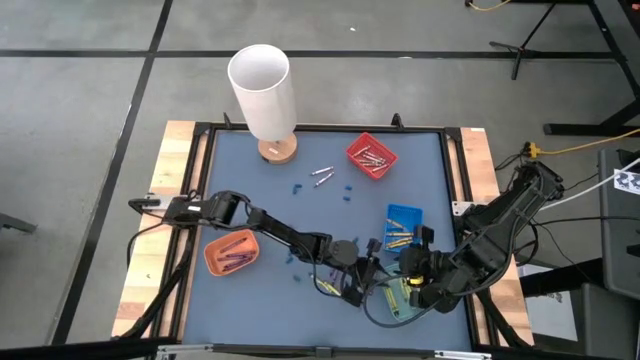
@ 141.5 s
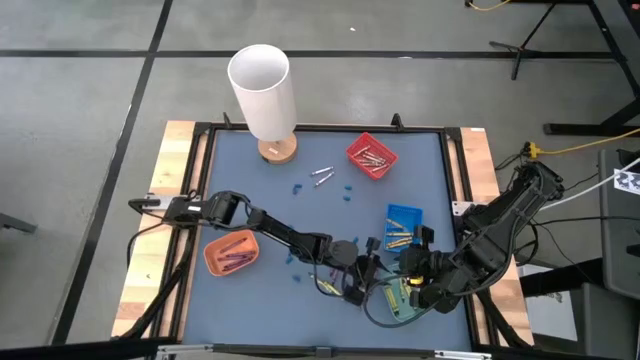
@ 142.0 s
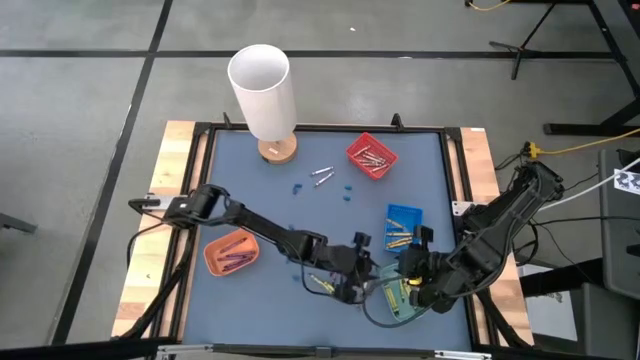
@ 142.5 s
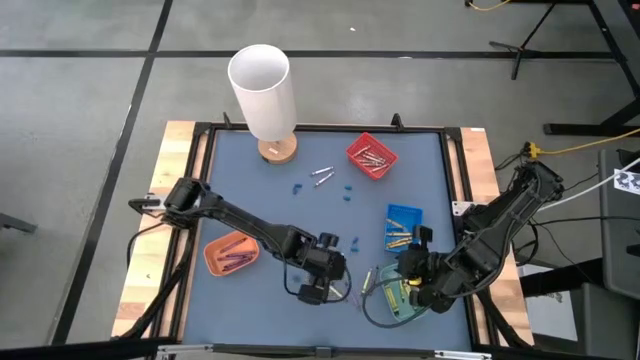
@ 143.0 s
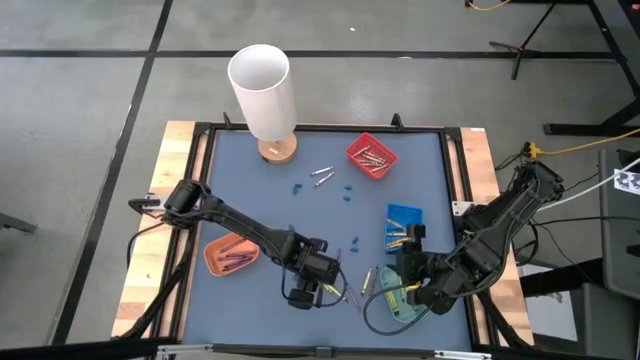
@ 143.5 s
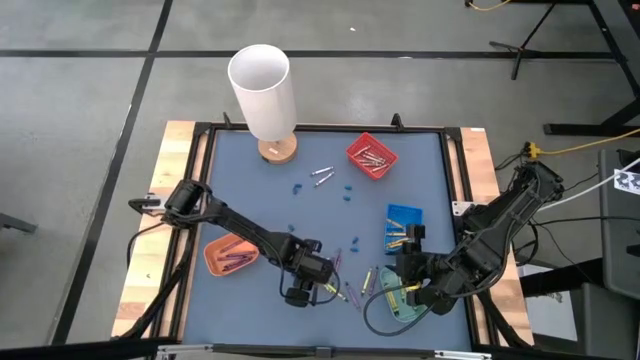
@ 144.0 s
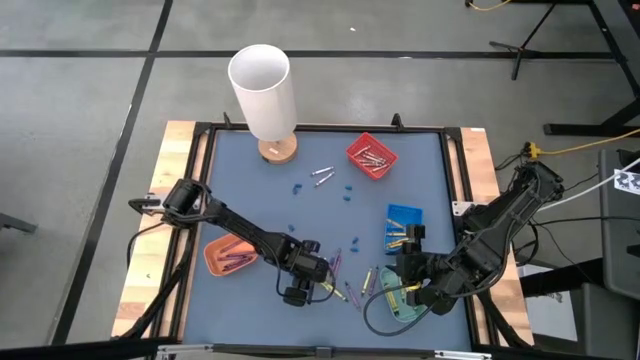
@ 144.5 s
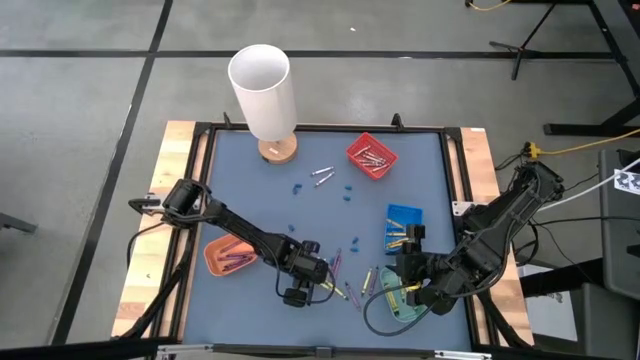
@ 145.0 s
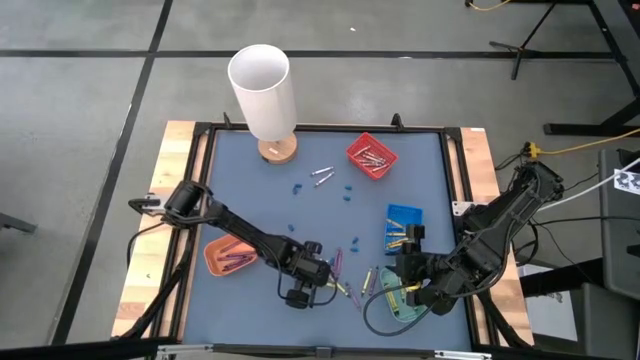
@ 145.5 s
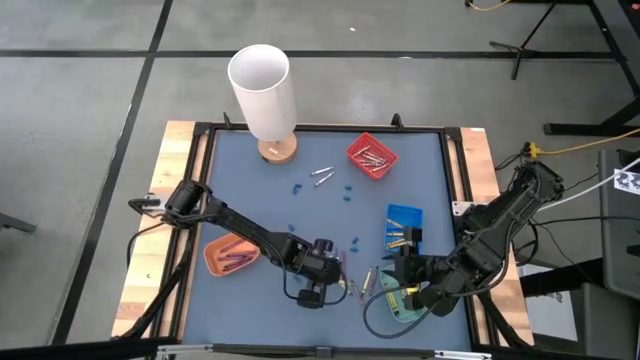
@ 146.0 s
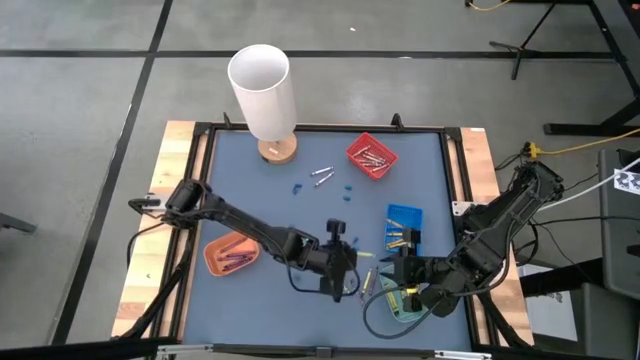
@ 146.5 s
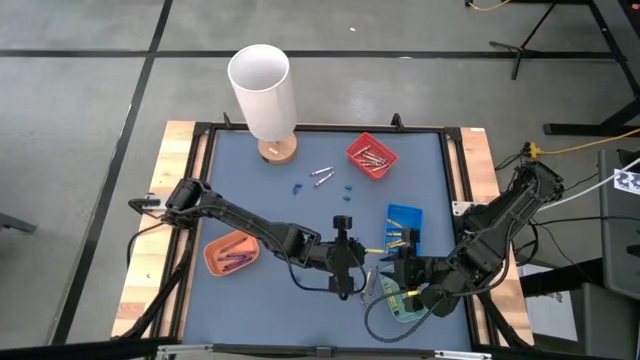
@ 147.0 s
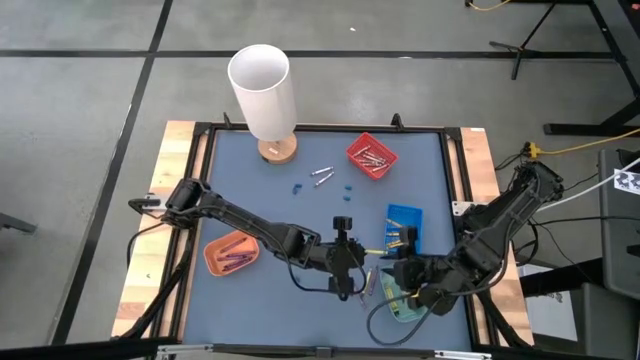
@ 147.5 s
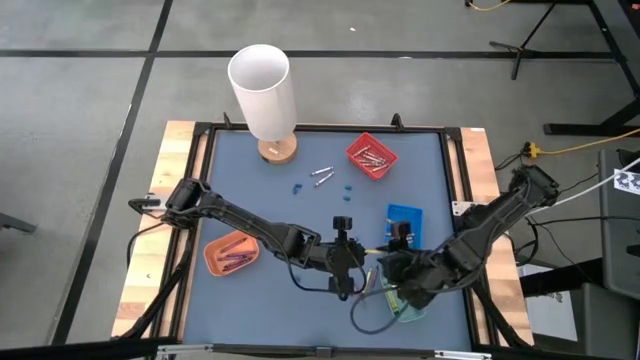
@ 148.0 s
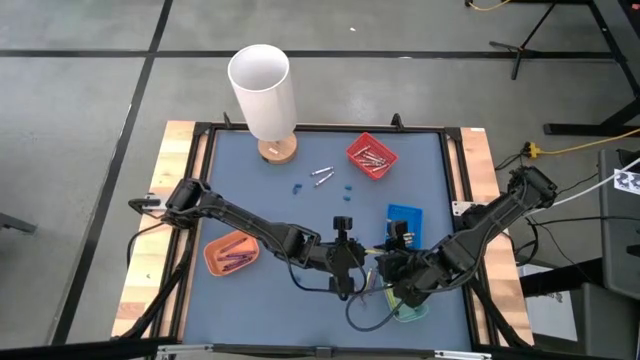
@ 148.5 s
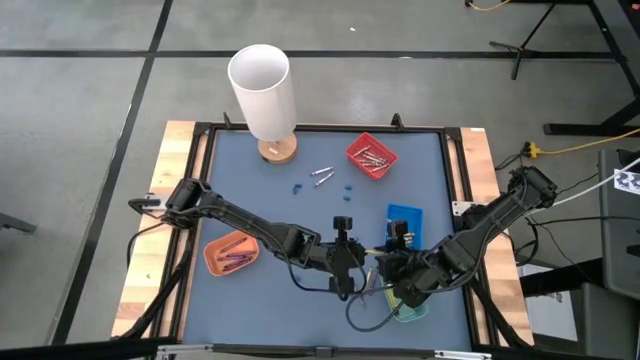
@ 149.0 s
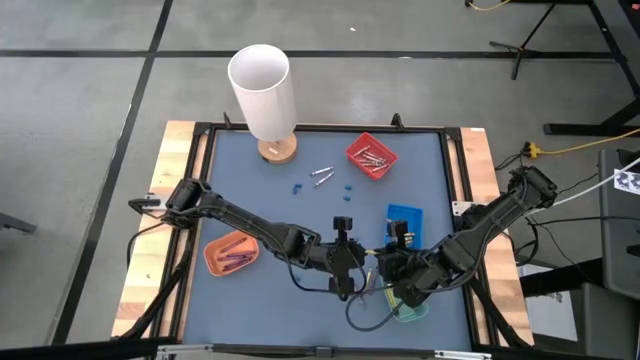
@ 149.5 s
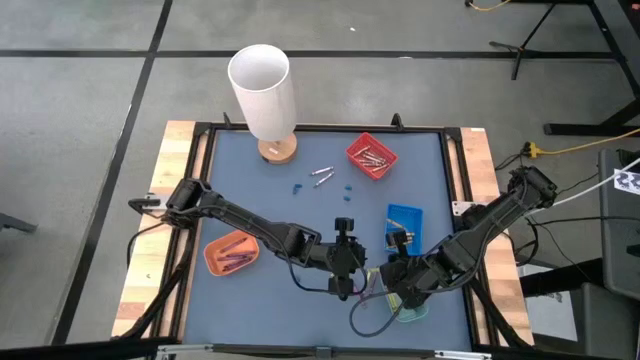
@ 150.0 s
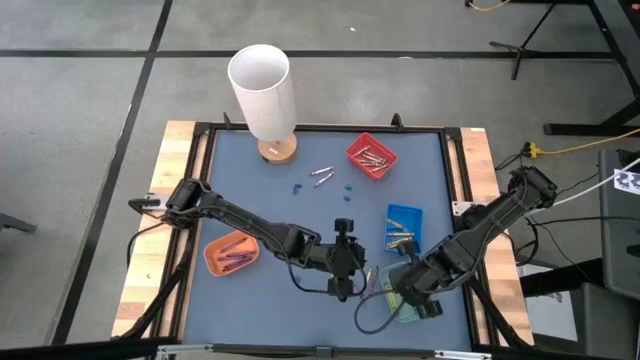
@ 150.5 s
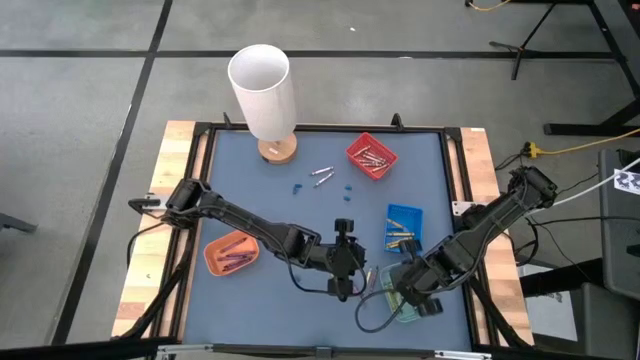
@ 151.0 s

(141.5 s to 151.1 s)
Task: Sort crayons
Put the green crayon into the green bin

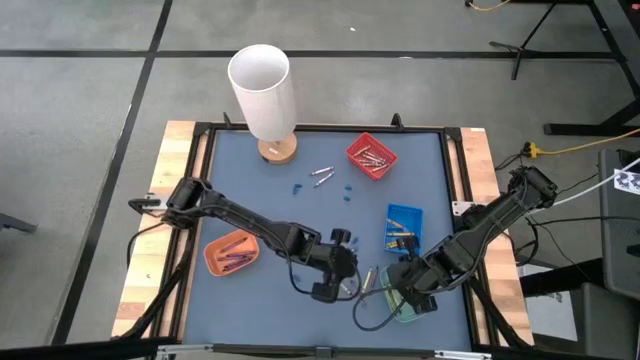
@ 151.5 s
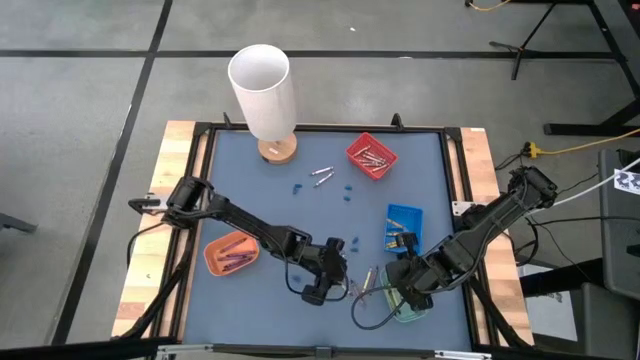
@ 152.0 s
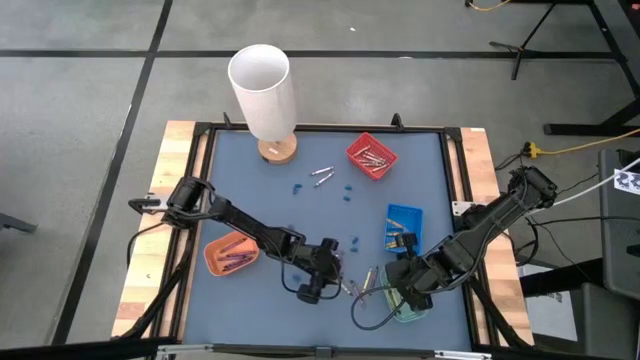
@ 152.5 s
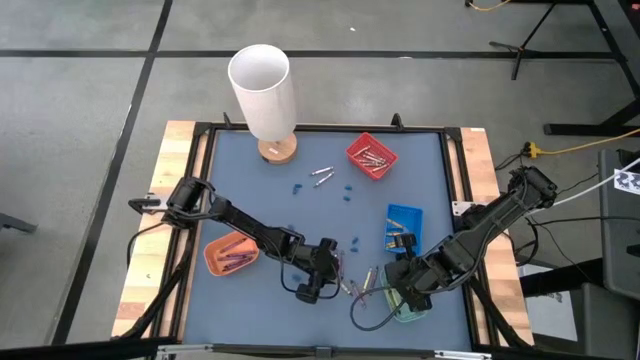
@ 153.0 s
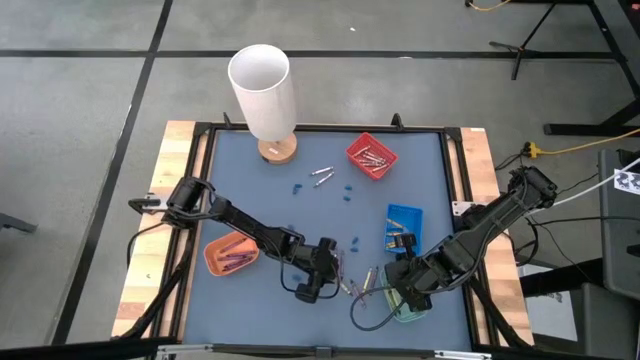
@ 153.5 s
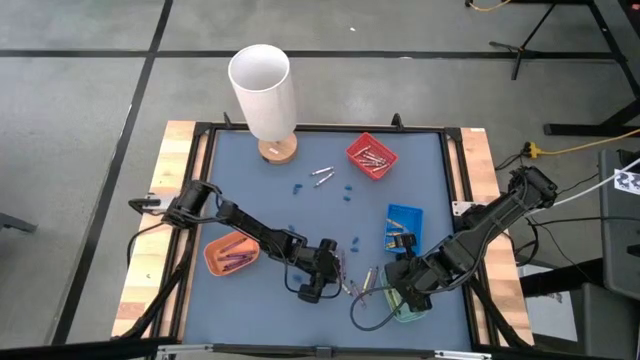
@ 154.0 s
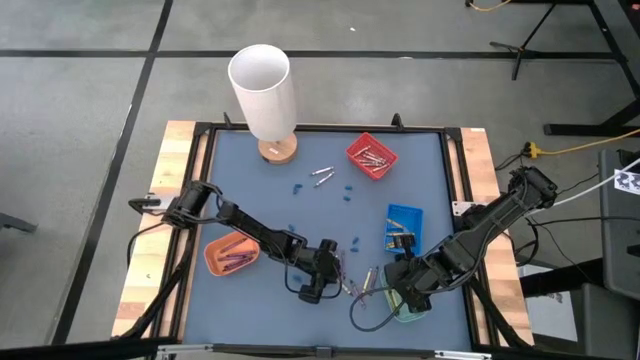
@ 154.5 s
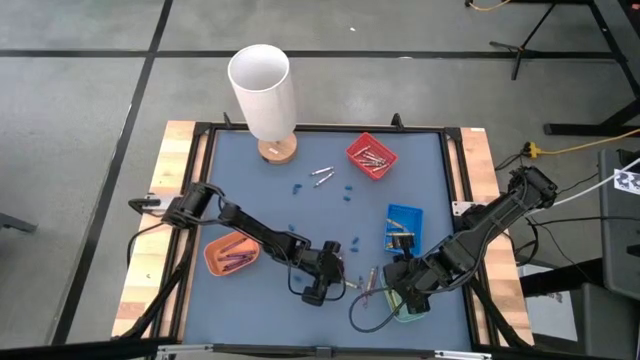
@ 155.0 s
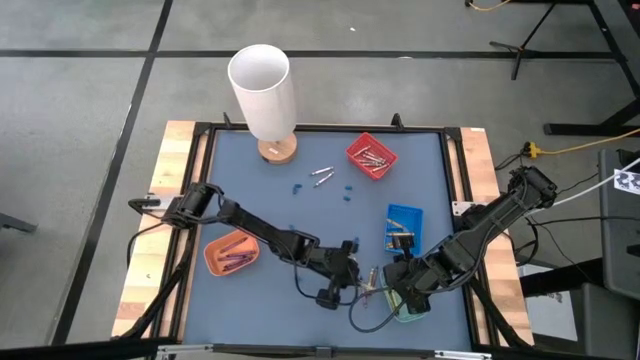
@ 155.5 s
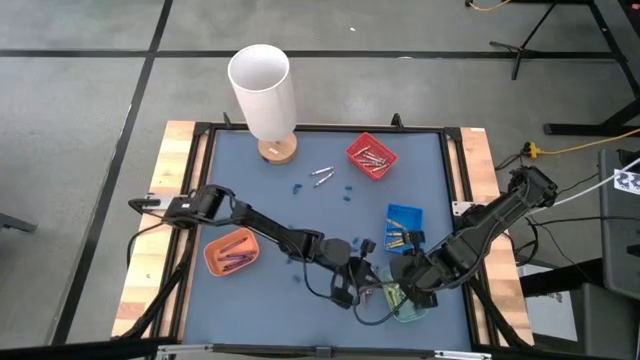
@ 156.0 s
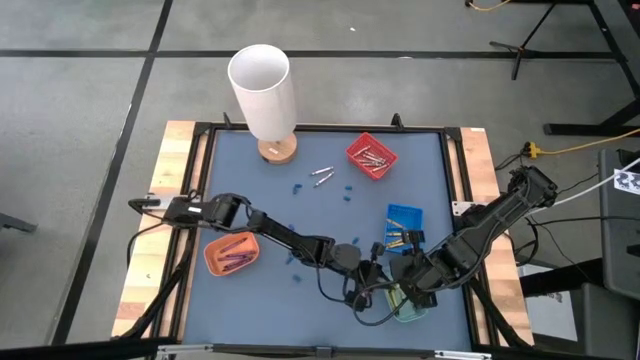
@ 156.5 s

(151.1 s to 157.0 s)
Put the green crayon into the green bin
